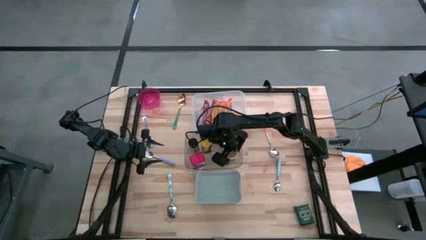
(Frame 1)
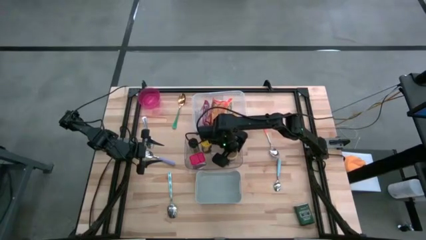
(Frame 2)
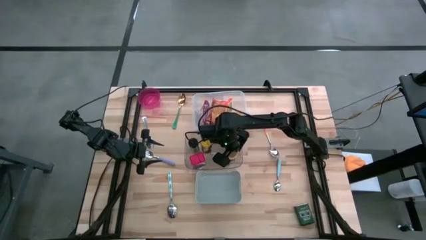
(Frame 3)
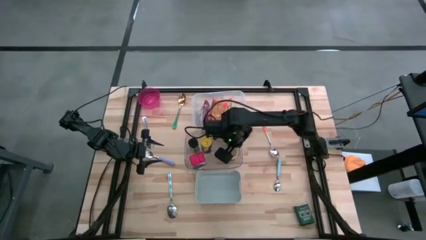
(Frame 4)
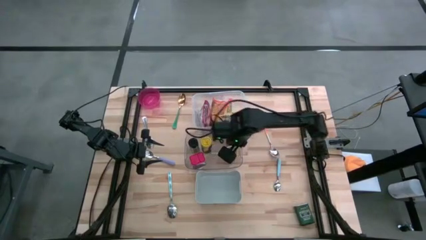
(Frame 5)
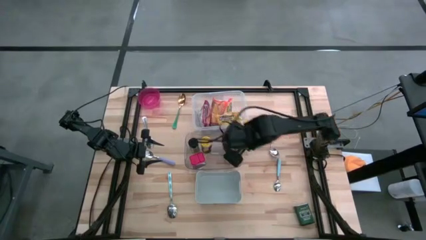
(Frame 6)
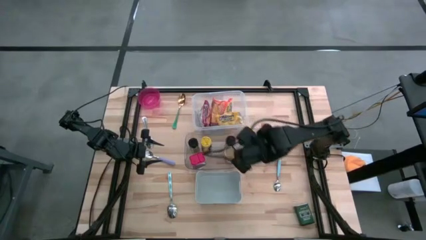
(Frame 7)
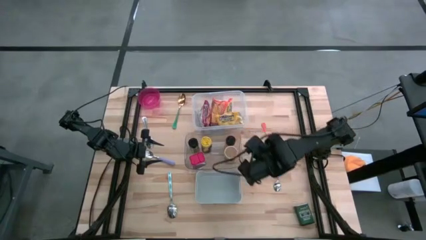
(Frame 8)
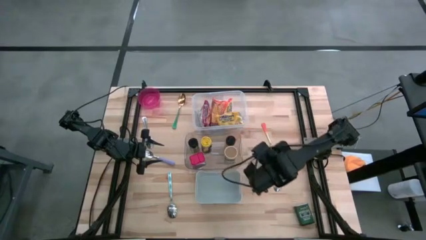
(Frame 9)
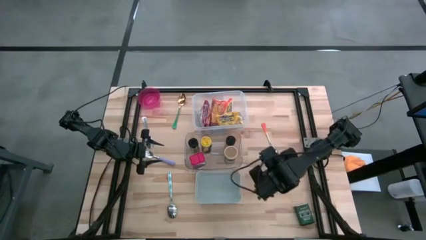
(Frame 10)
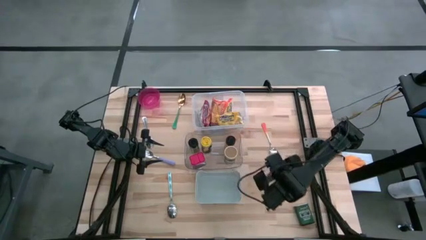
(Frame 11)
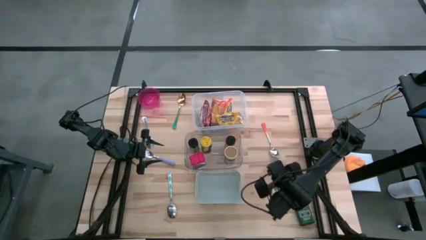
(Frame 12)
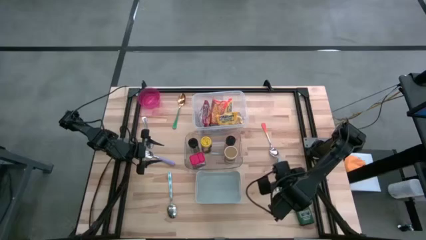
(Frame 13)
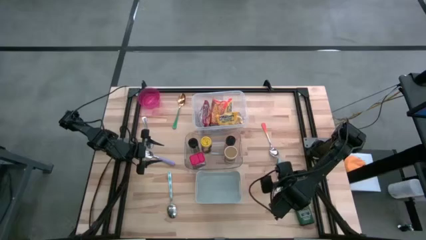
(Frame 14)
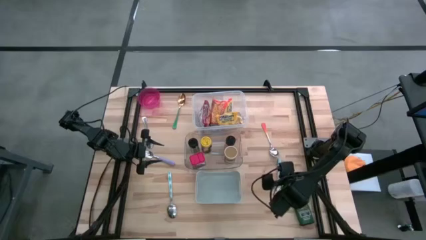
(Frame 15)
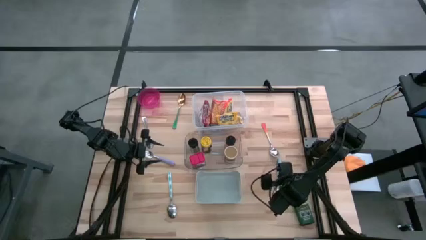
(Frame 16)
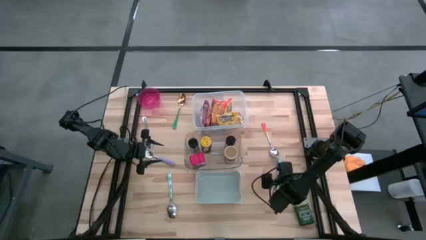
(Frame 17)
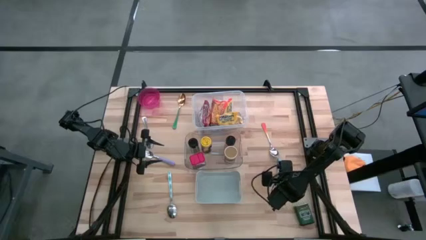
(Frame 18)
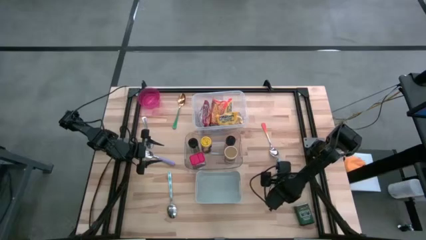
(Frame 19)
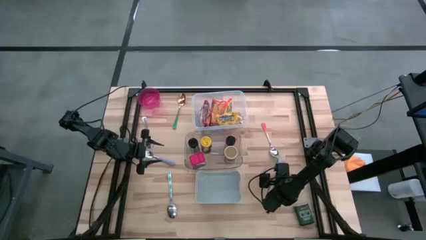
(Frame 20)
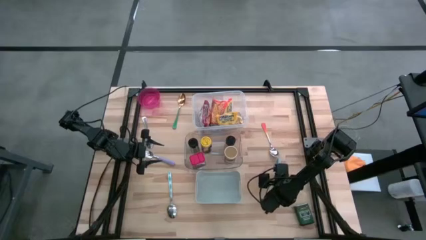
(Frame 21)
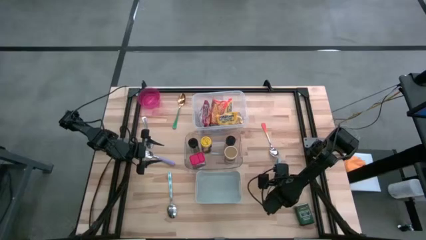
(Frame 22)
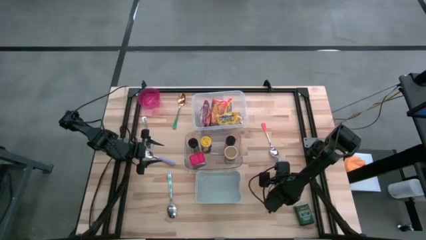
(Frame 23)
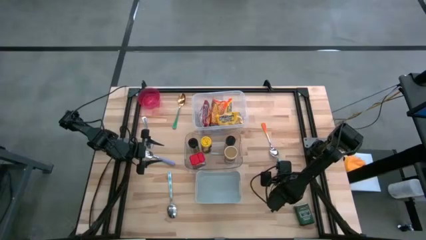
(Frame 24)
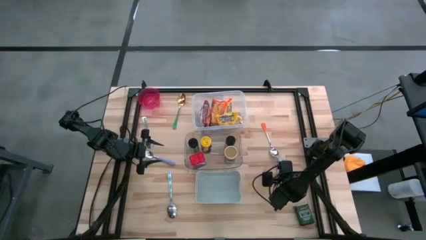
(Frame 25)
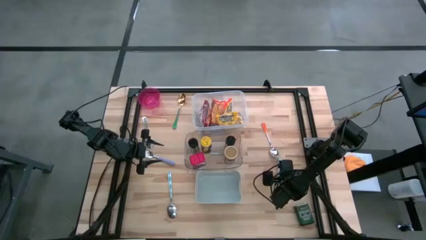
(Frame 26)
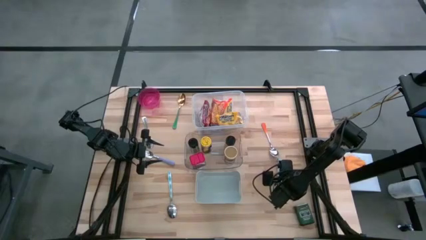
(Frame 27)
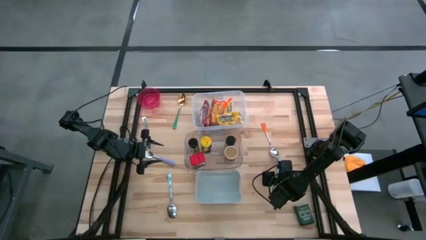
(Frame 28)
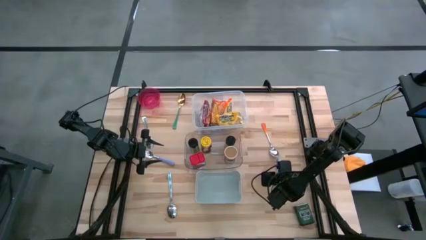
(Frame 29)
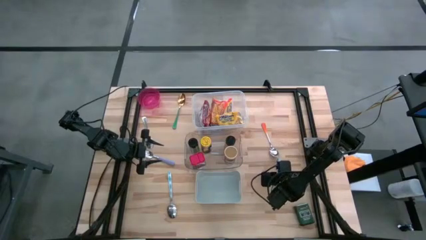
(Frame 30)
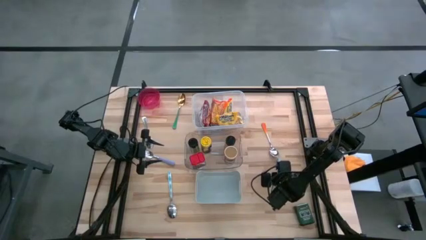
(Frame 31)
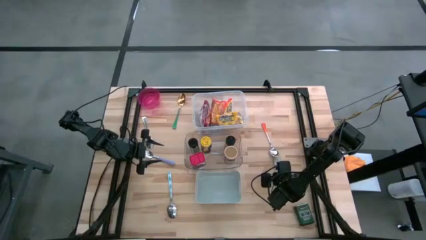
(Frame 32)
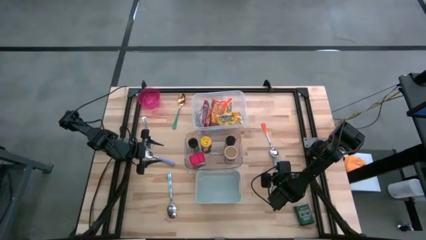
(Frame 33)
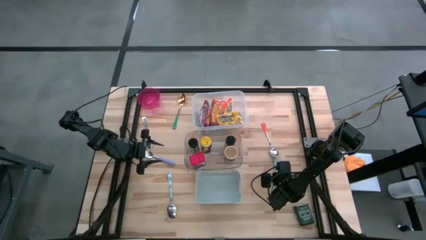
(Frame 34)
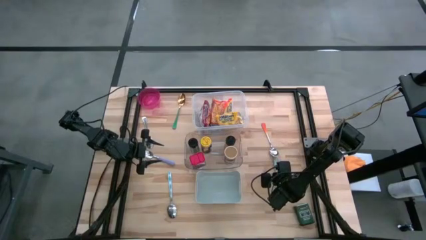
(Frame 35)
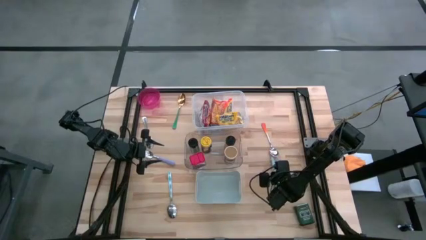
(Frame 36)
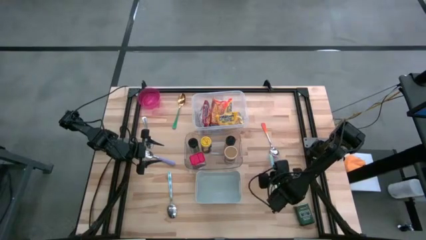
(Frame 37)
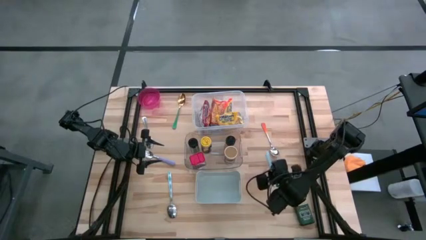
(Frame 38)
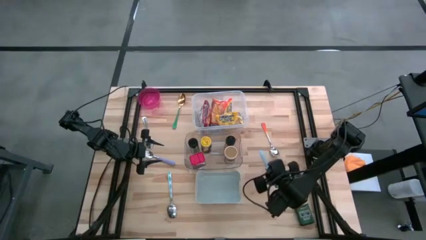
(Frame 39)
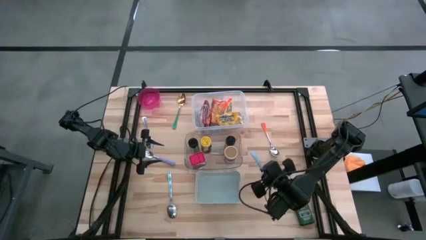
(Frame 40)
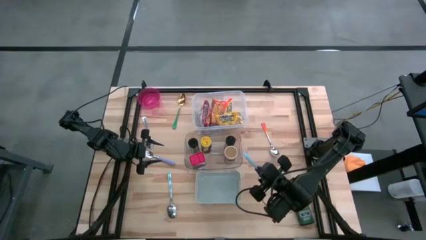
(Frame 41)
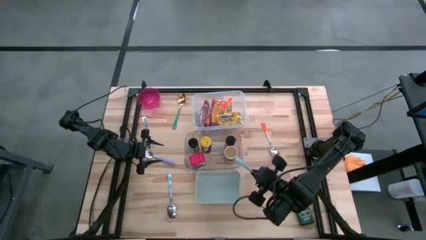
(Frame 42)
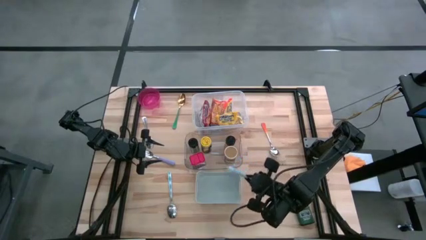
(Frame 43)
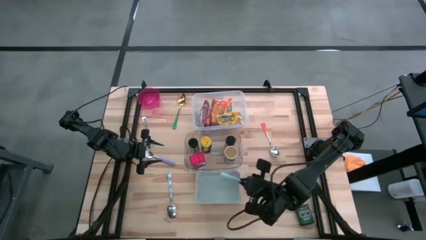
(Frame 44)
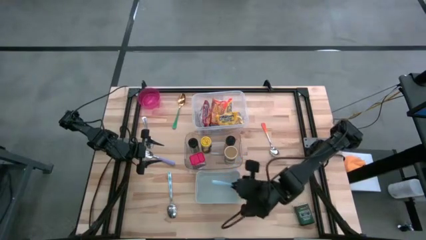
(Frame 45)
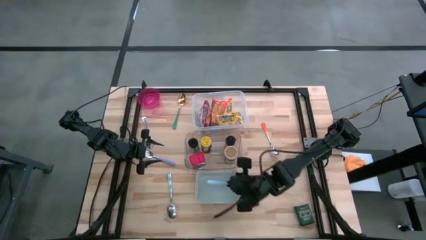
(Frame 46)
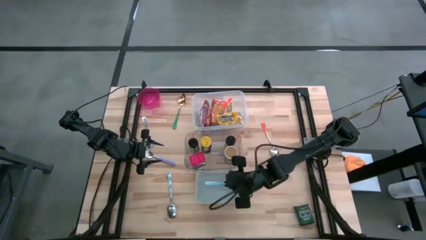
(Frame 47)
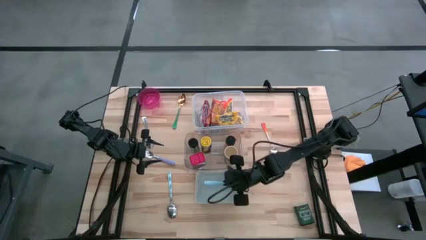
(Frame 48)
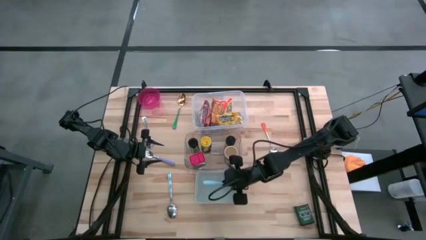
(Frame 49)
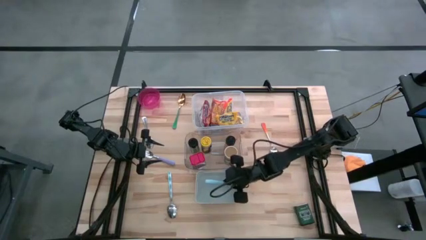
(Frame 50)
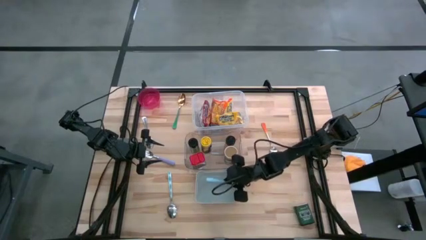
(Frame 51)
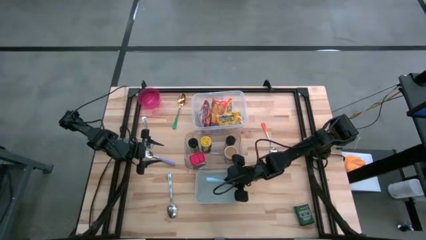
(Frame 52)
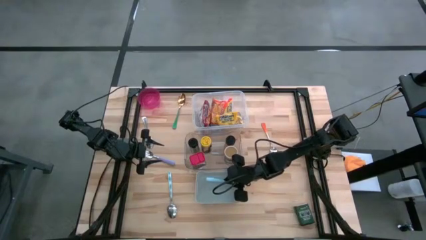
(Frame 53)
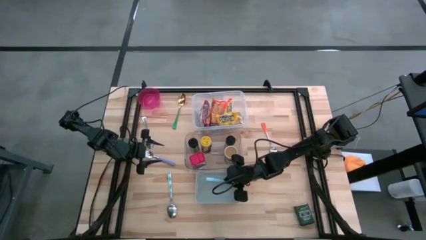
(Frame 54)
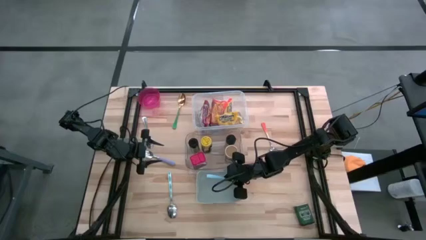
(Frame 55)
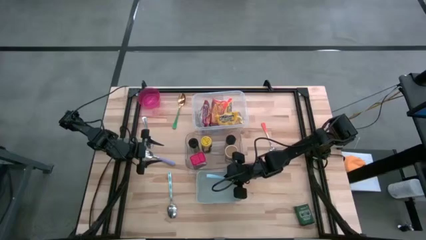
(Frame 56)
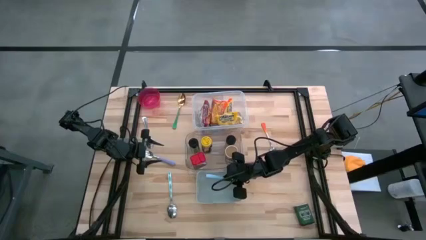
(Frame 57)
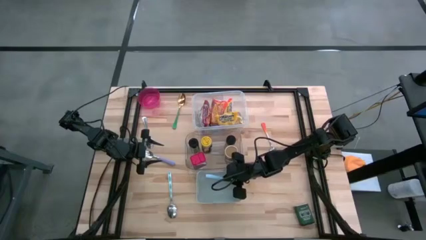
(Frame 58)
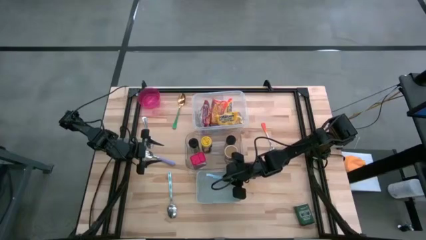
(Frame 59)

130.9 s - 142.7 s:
Put the blue spoon into the gray bin
